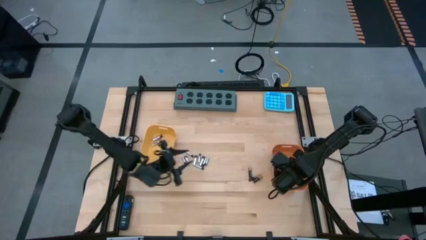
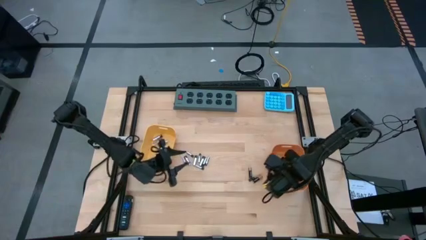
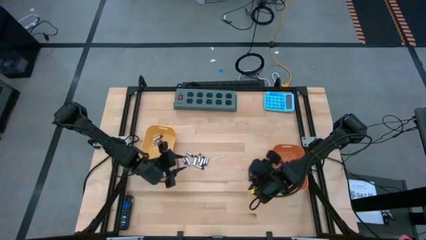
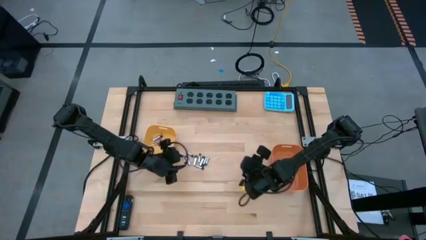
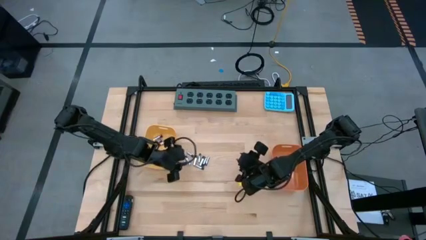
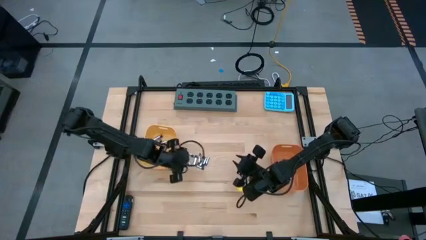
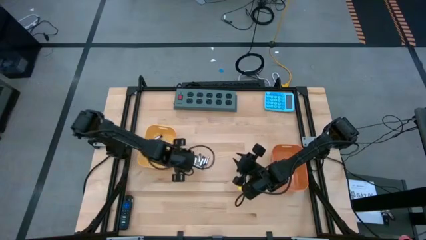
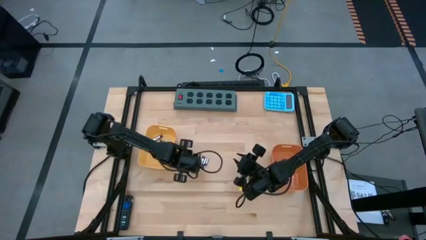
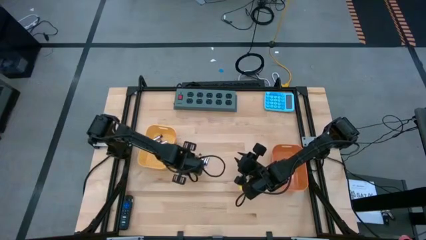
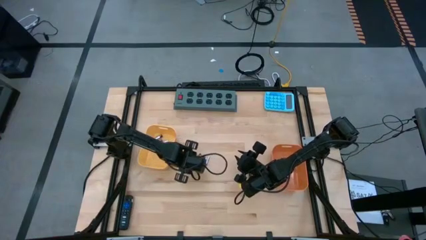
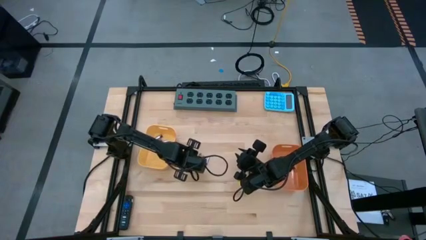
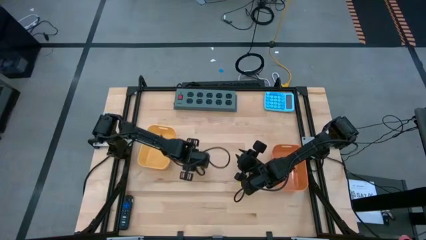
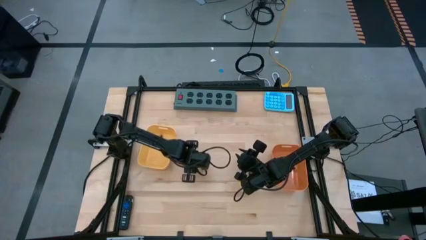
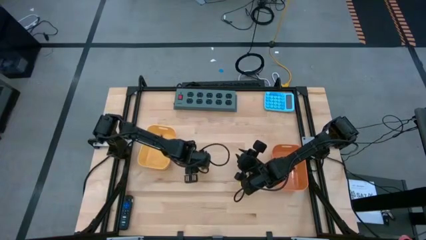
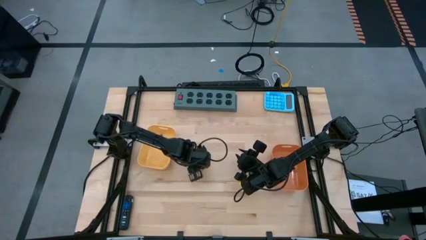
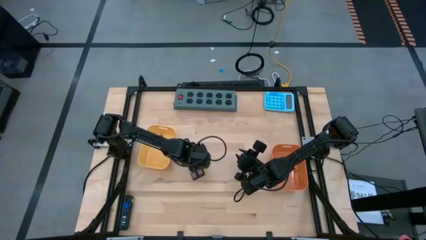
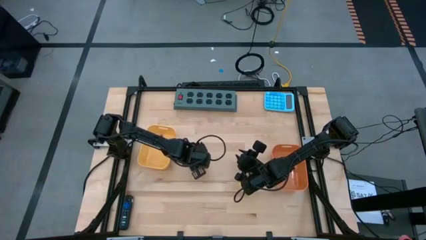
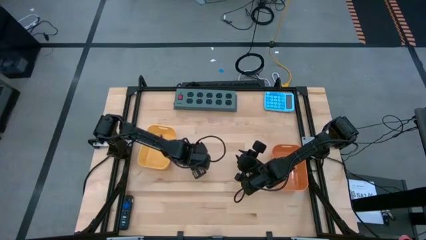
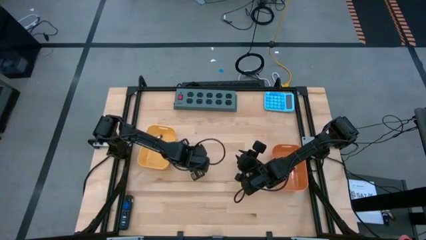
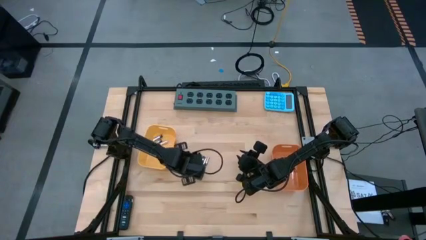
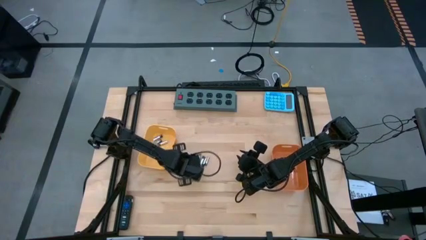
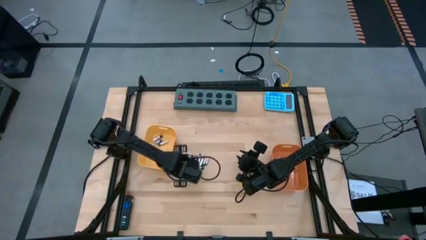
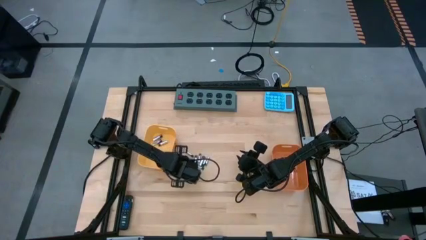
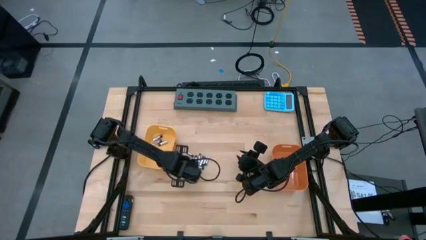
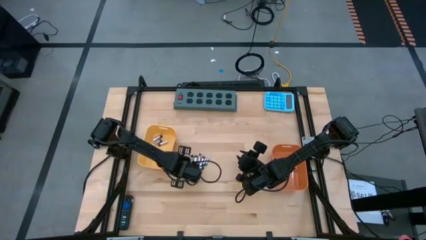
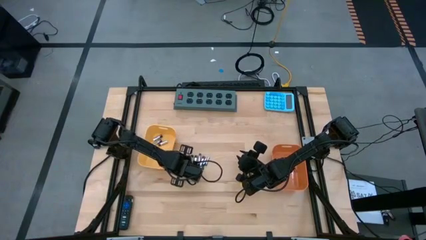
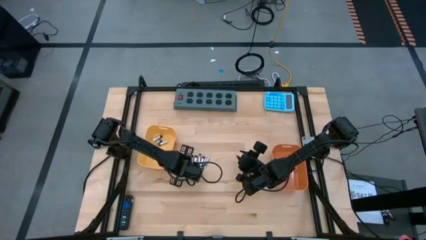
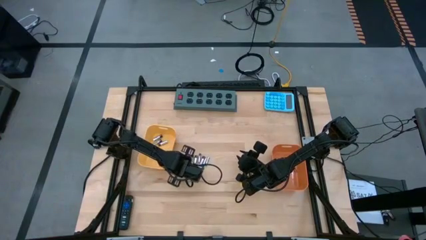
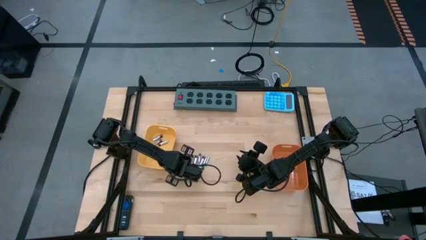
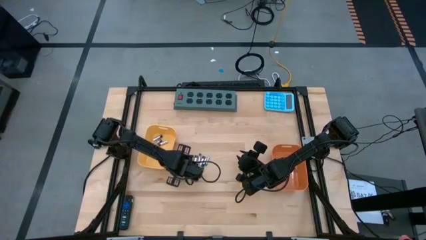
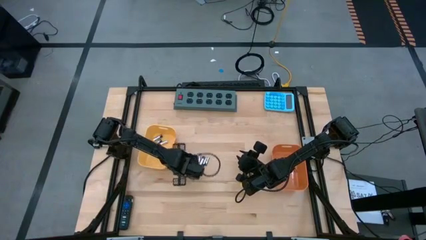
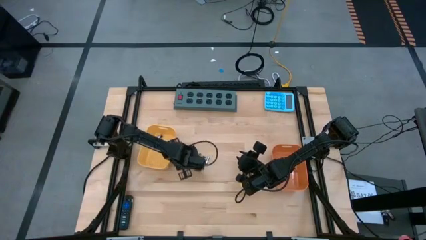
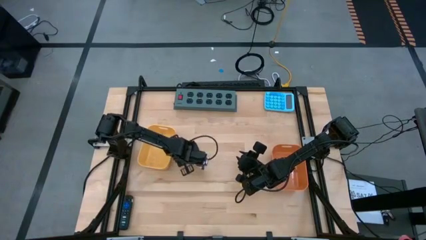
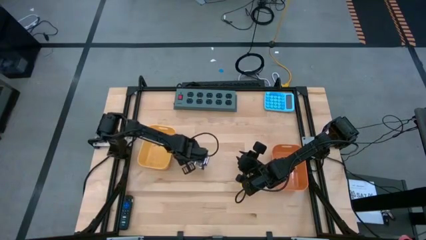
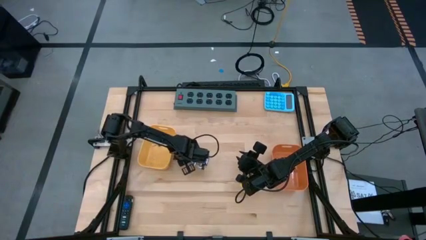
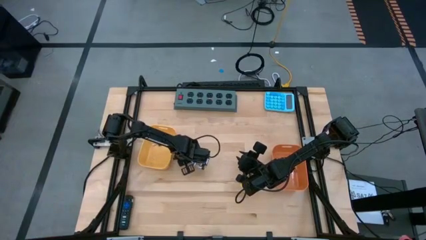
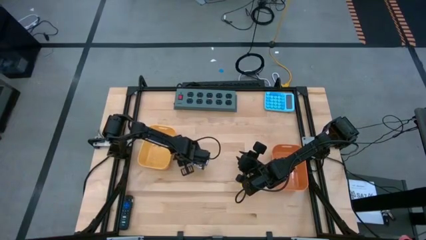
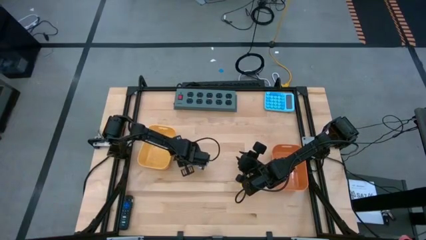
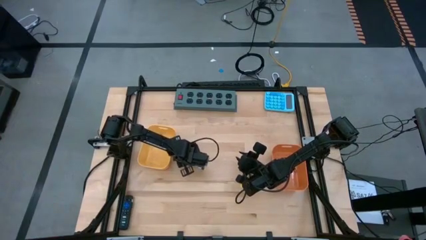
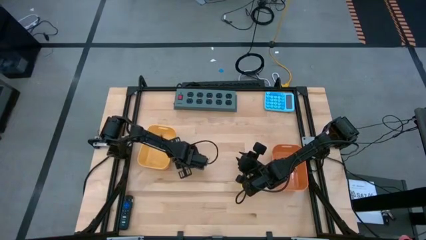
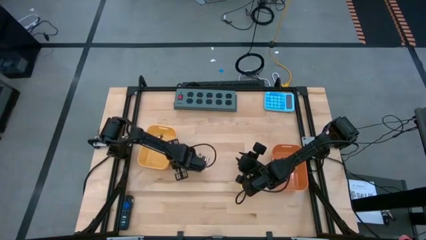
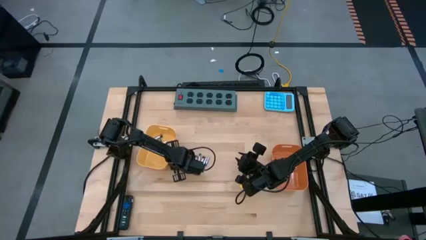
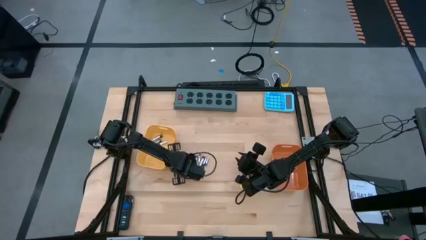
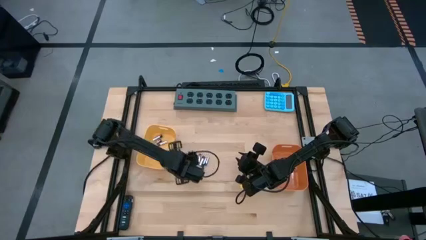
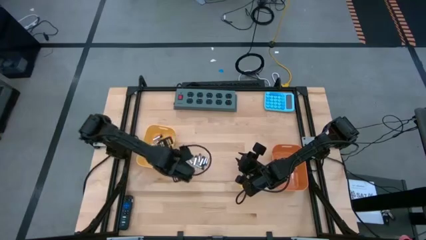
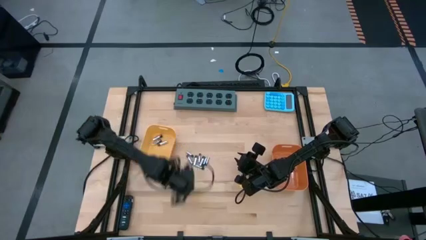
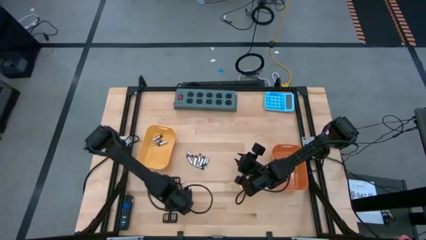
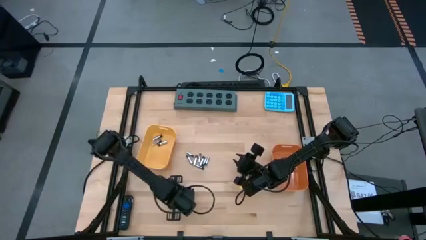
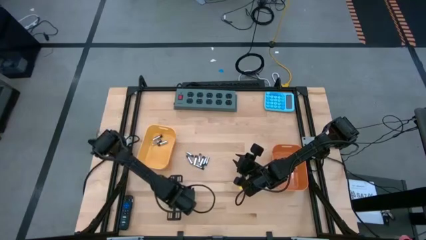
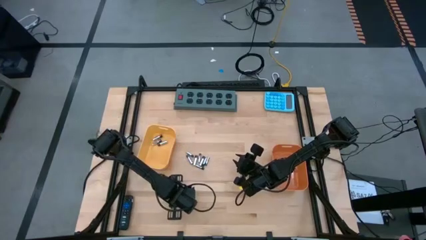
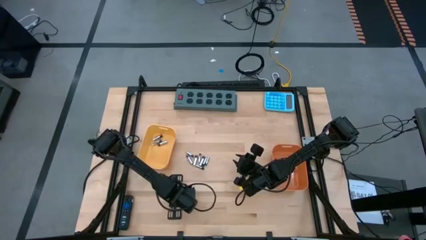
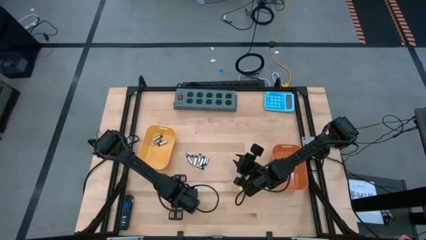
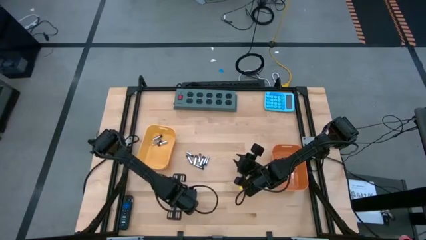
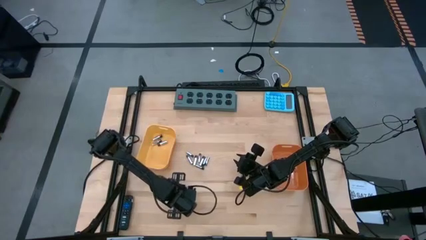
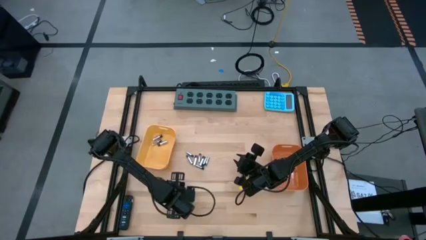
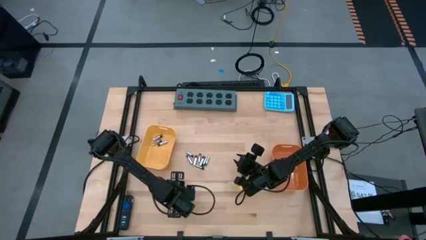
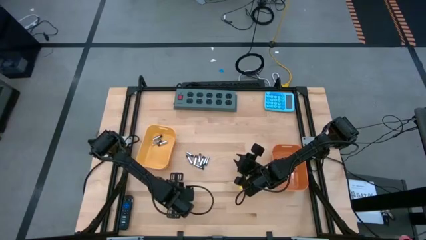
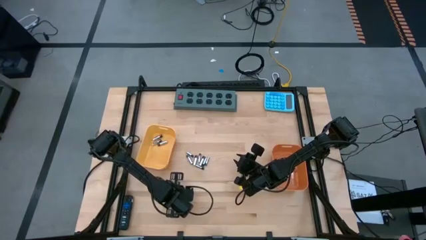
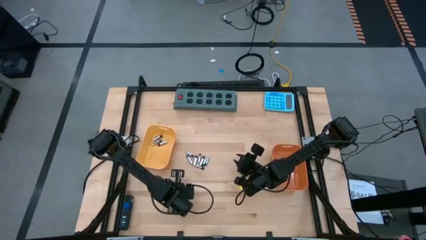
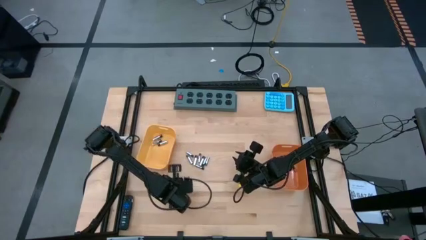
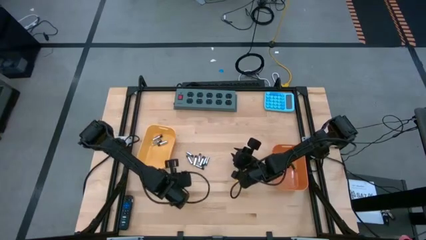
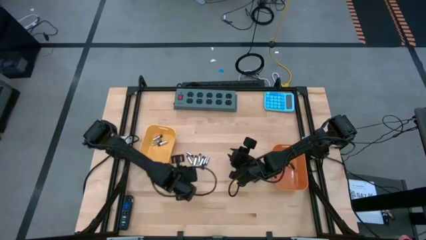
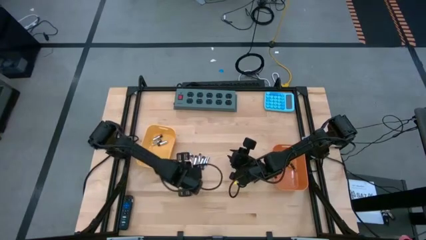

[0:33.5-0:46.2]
Task: Sort batteries
Put the silver battery into the yellow bin

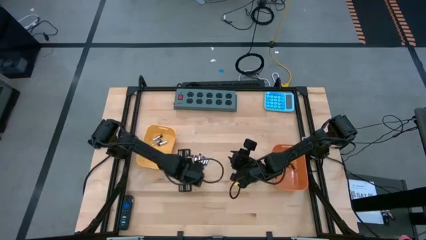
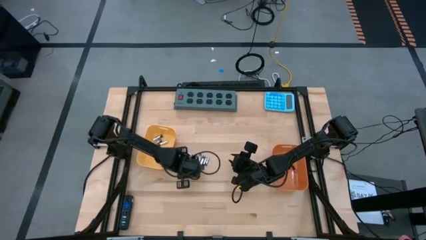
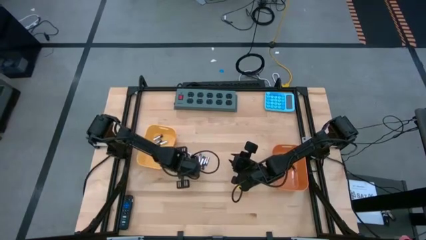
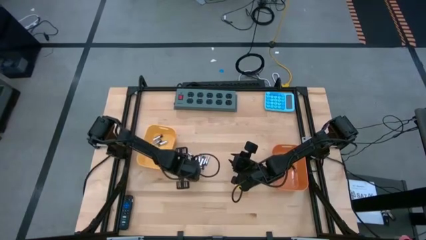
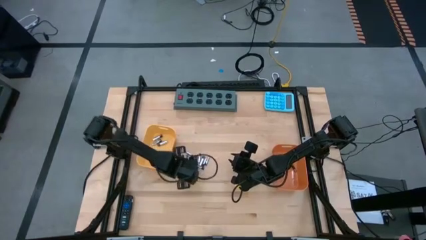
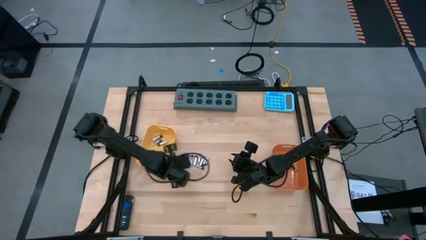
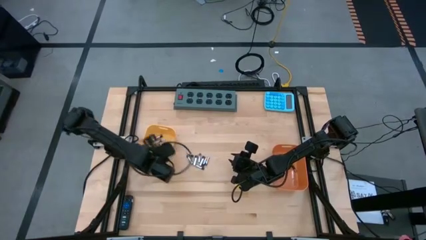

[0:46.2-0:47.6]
Put the silver battery into the yellow bin

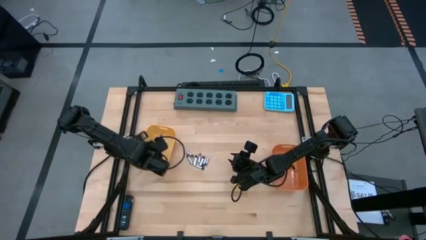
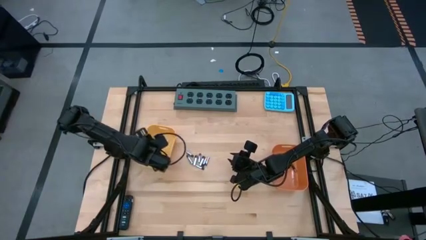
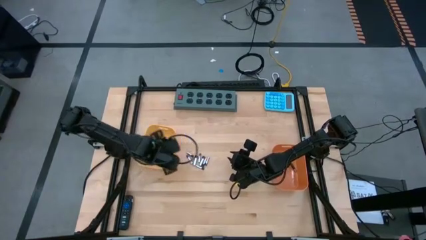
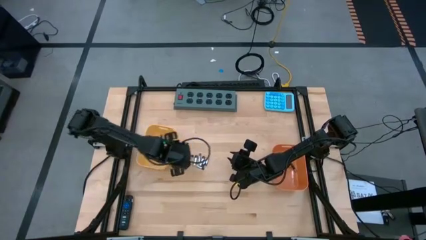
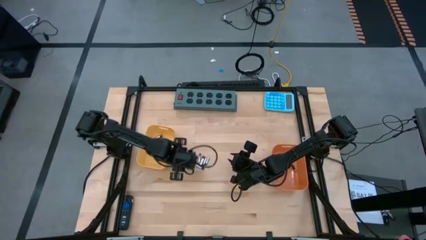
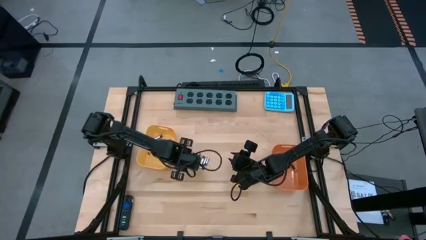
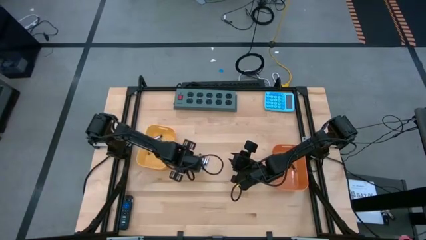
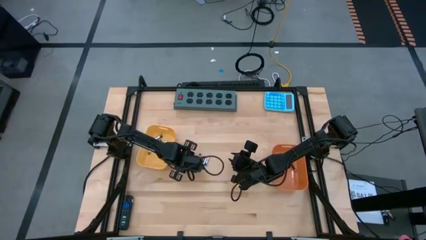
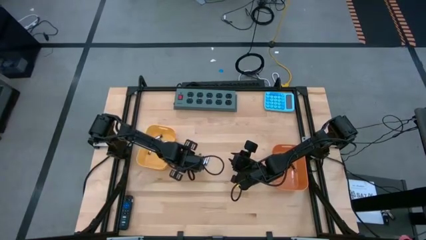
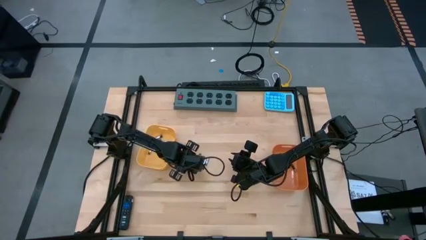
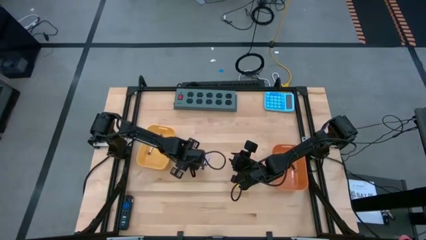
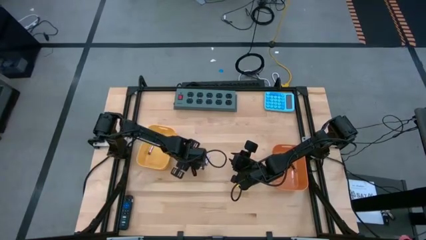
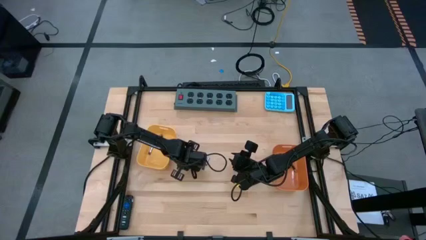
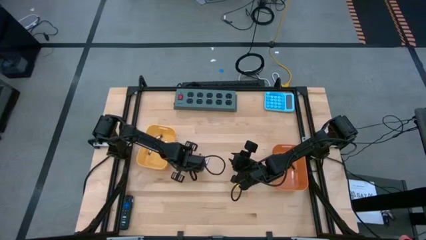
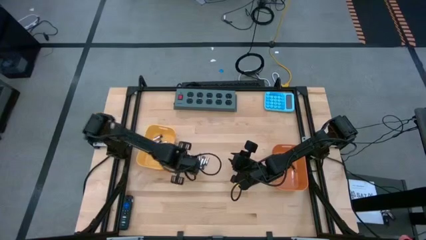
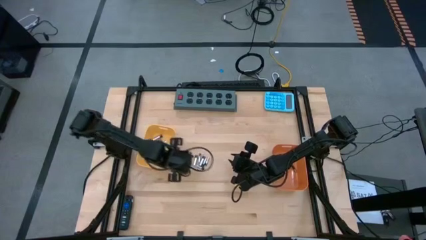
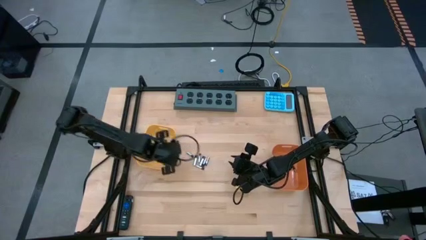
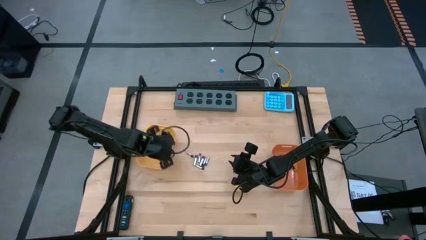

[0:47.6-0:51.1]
Put the silver battery into the yellow bin
